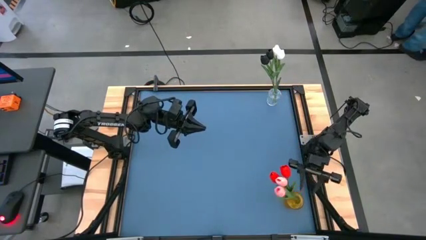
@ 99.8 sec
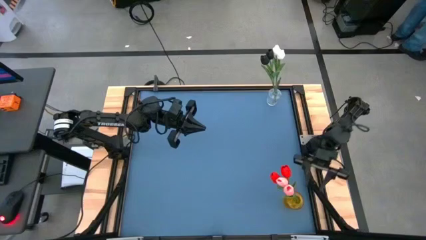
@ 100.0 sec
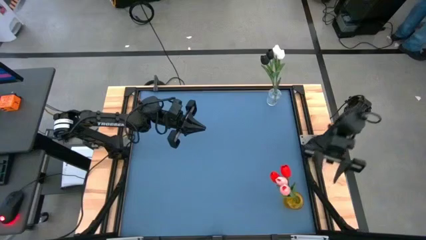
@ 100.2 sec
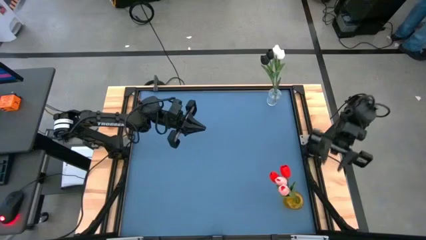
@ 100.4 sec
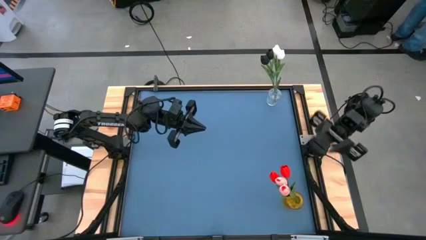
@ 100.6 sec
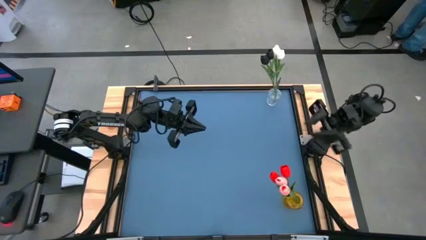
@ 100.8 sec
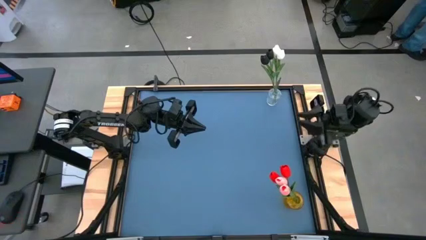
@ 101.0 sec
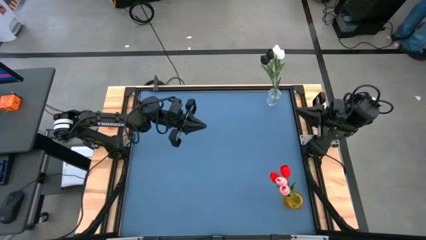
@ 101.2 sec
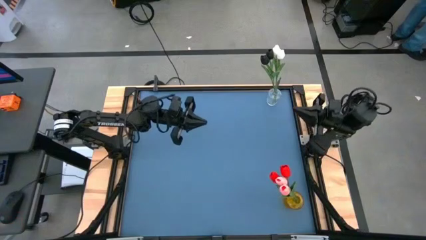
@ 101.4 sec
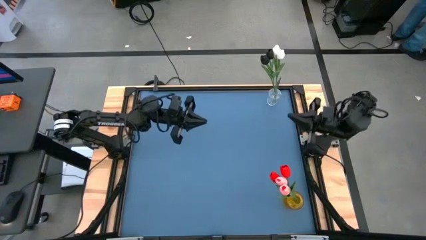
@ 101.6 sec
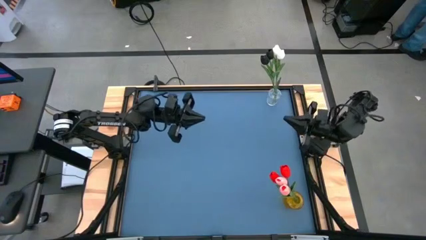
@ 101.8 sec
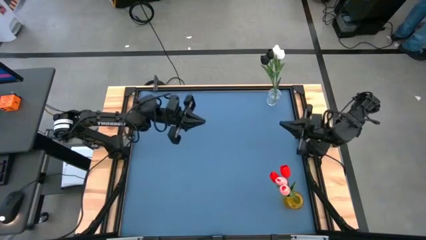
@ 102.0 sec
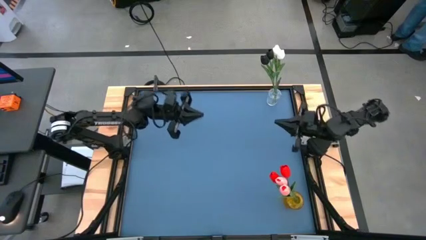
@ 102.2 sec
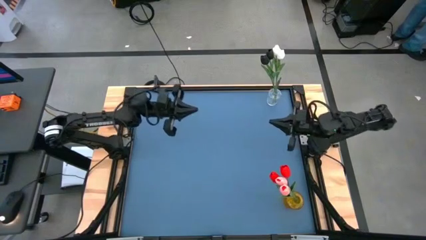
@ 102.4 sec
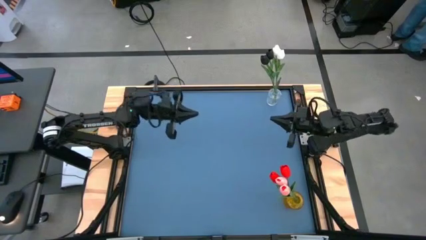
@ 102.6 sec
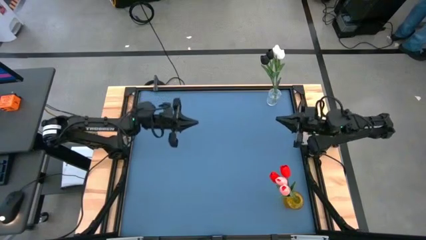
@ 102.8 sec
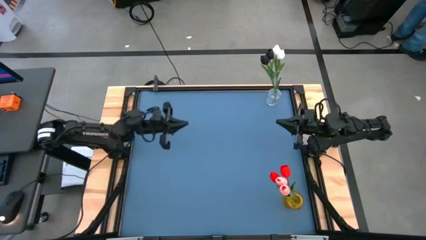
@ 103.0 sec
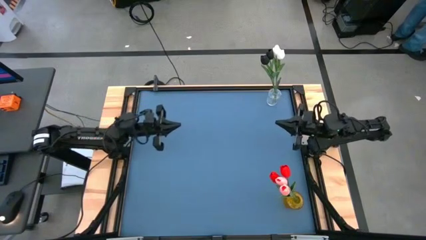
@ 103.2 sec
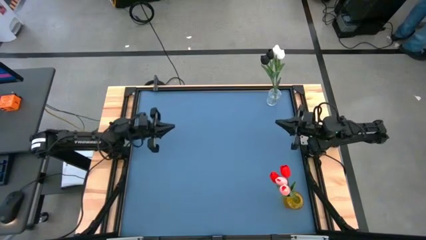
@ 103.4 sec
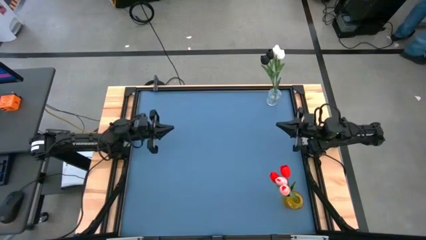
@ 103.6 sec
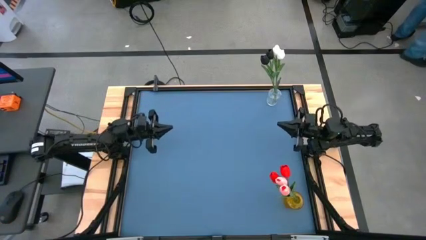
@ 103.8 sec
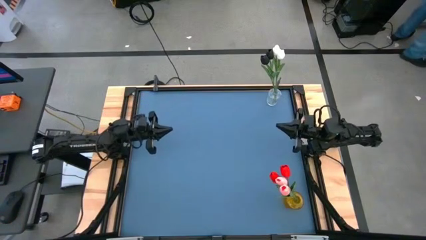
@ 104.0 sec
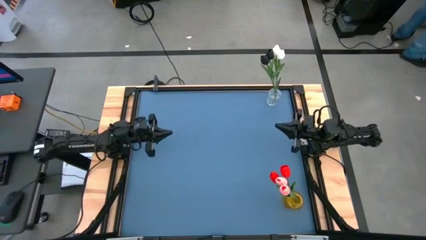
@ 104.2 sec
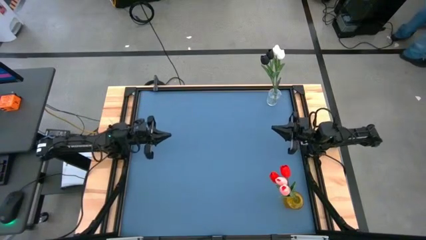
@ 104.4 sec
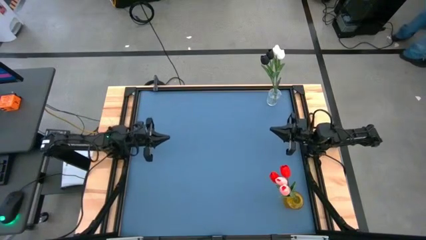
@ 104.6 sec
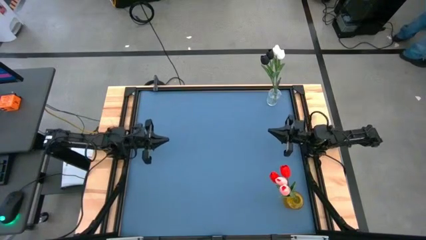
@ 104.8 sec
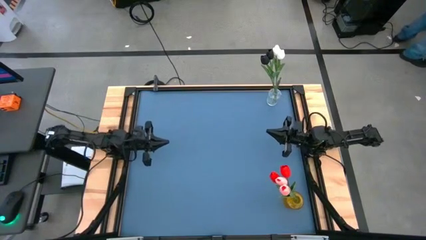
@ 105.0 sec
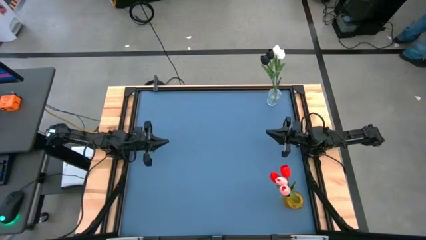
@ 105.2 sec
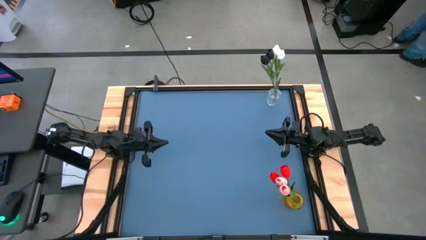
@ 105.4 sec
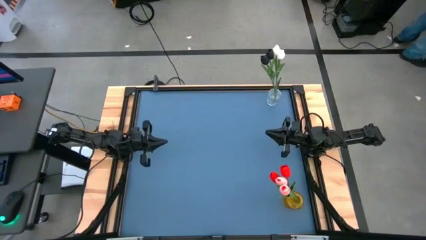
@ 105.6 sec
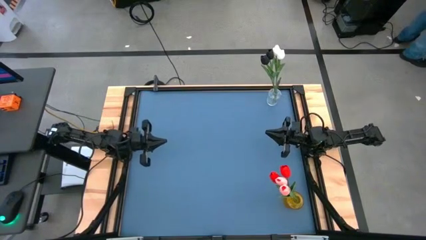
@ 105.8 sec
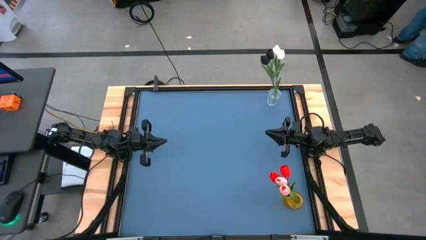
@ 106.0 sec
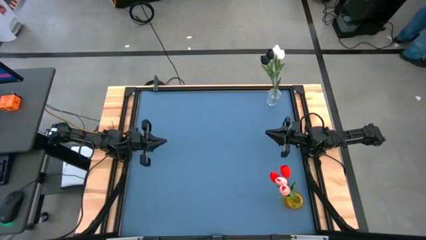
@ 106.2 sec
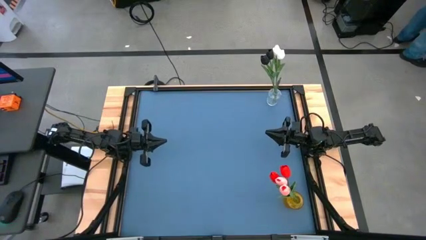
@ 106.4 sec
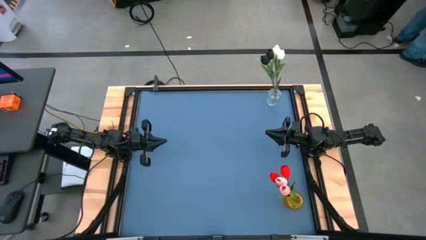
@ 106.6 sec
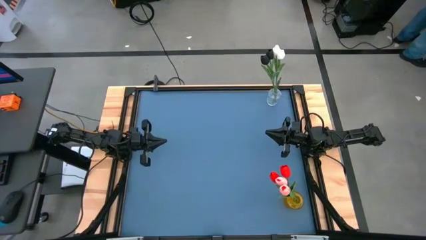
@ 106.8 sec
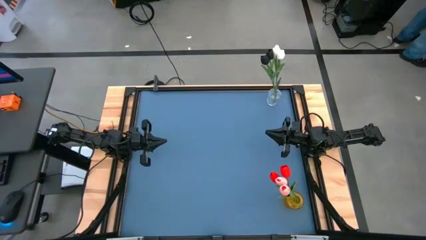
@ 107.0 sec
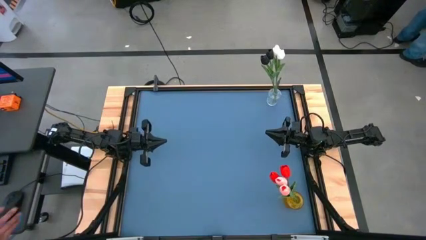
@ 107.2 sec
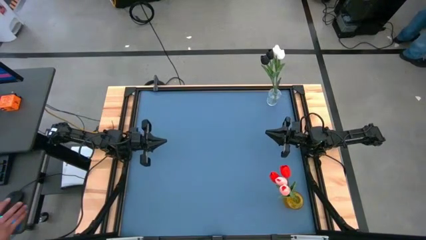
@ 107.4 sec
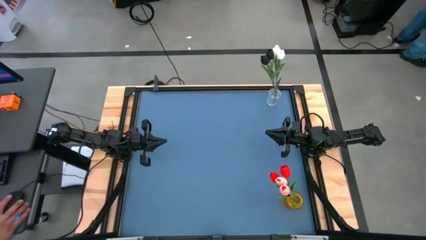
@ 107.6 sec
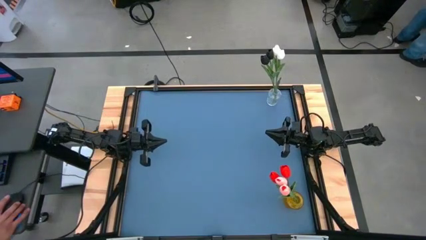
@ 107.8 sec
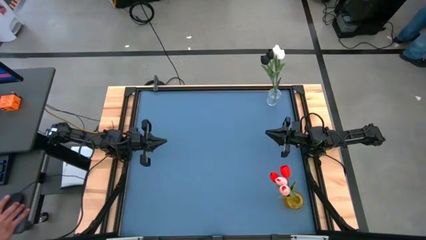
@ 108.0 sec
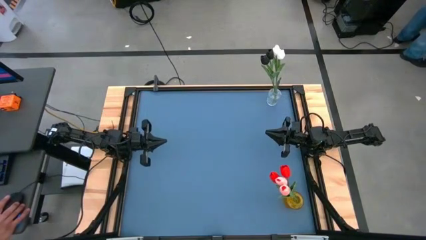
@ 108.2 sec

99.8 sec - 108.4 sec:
Task: Sort flowers into vase by color
Return to Home Position

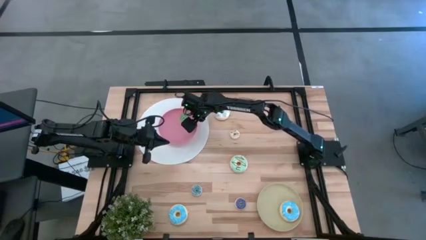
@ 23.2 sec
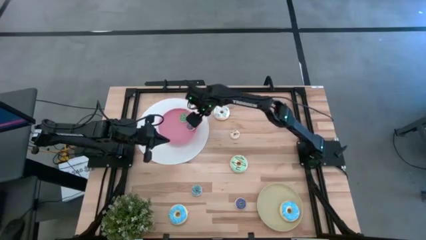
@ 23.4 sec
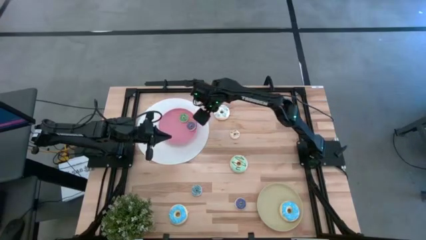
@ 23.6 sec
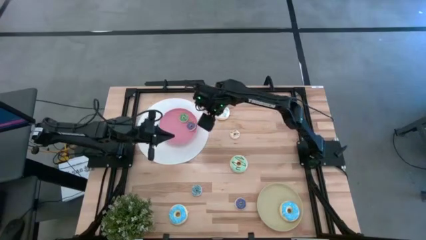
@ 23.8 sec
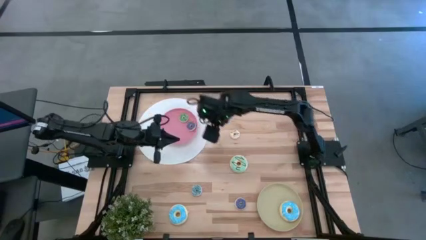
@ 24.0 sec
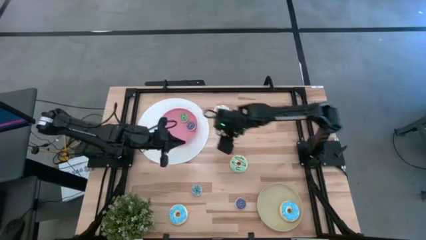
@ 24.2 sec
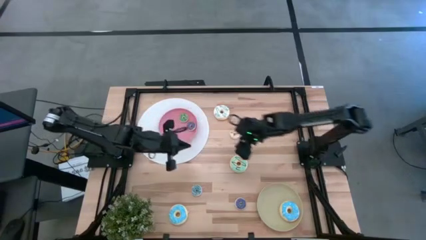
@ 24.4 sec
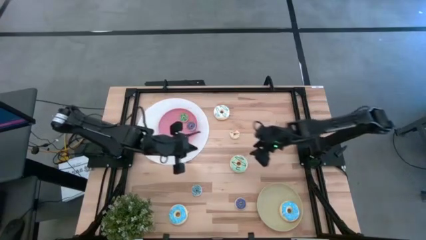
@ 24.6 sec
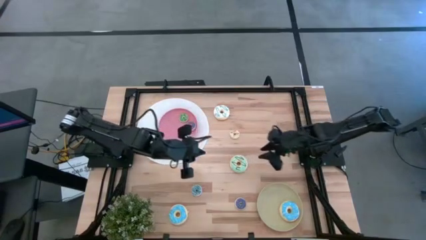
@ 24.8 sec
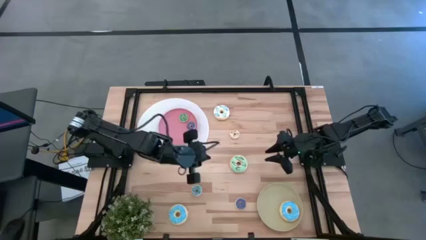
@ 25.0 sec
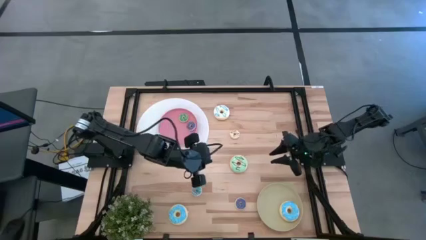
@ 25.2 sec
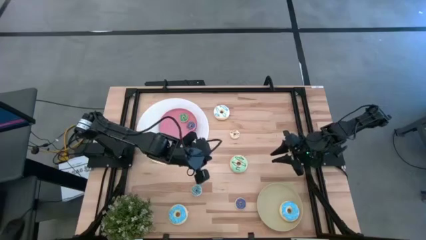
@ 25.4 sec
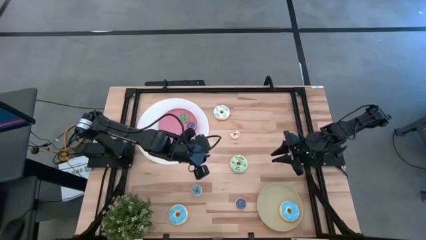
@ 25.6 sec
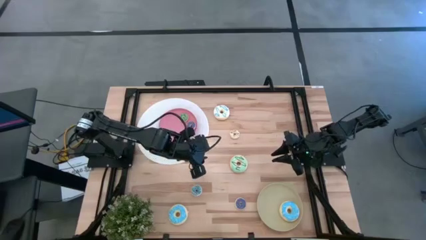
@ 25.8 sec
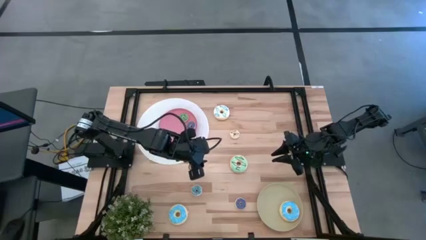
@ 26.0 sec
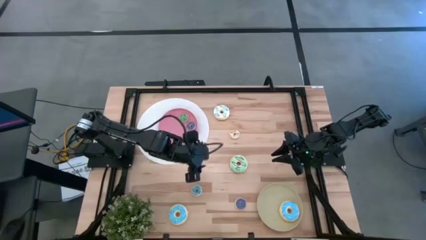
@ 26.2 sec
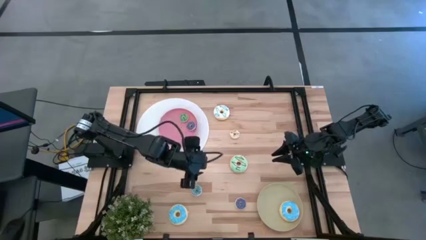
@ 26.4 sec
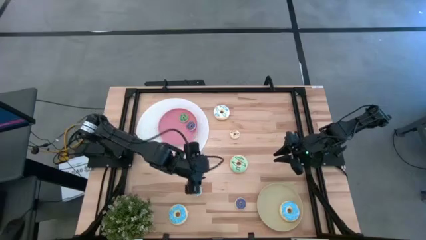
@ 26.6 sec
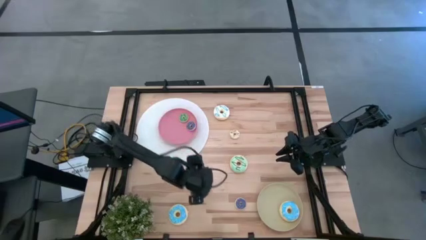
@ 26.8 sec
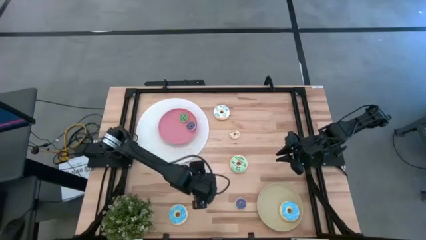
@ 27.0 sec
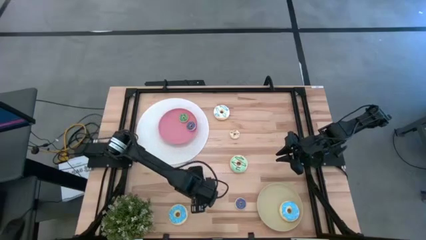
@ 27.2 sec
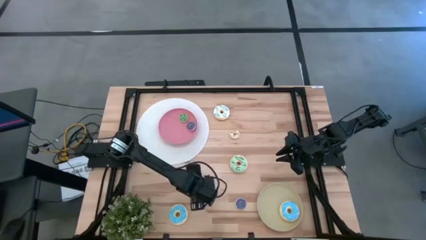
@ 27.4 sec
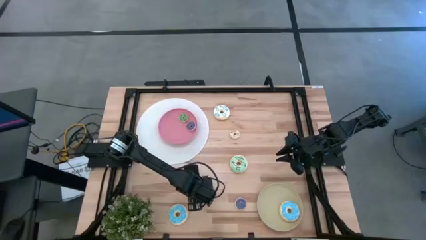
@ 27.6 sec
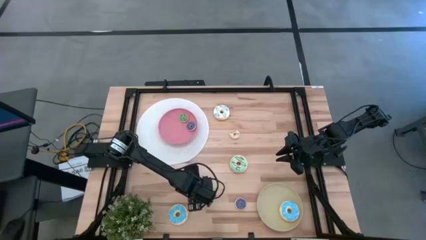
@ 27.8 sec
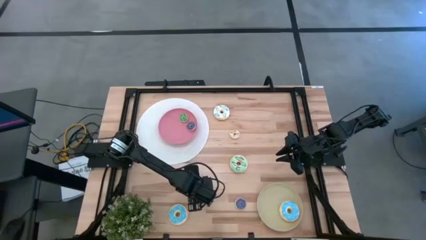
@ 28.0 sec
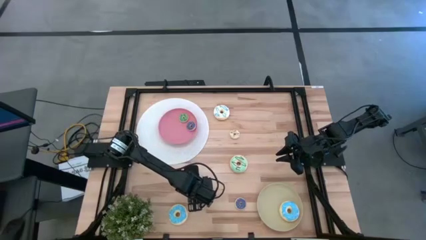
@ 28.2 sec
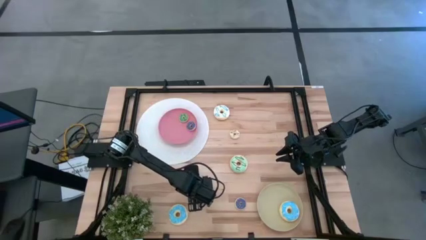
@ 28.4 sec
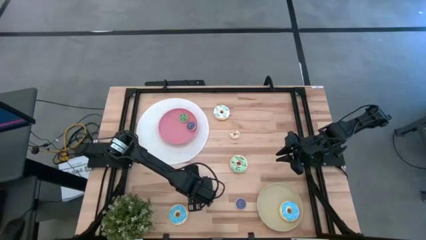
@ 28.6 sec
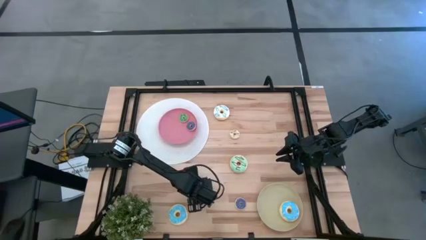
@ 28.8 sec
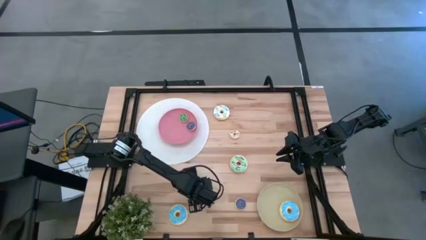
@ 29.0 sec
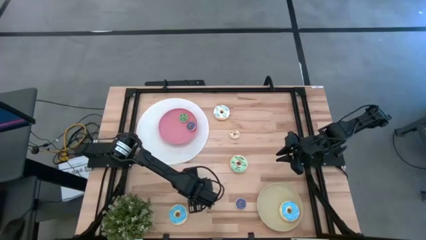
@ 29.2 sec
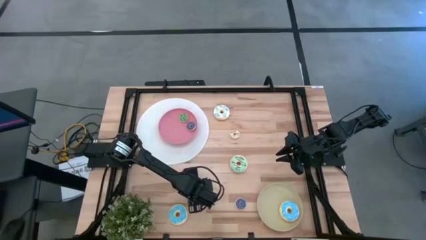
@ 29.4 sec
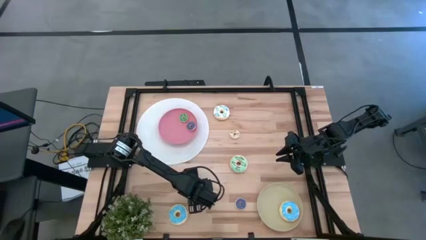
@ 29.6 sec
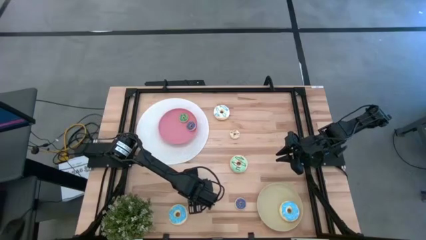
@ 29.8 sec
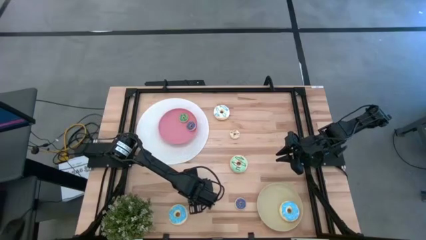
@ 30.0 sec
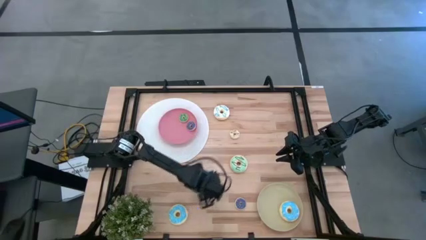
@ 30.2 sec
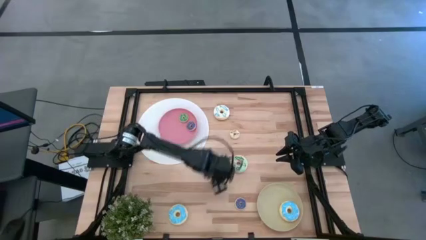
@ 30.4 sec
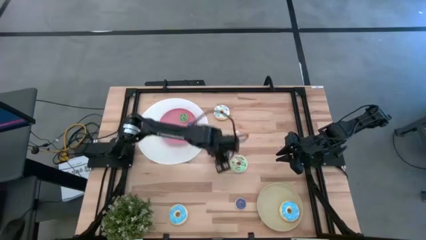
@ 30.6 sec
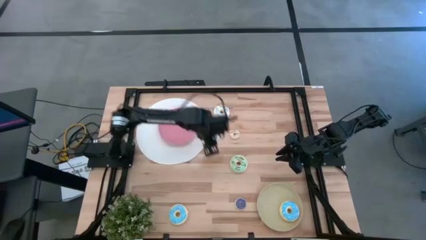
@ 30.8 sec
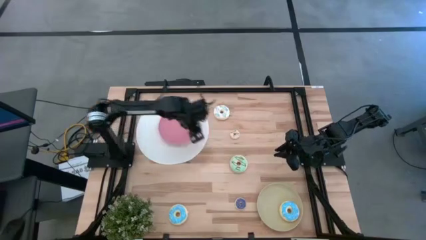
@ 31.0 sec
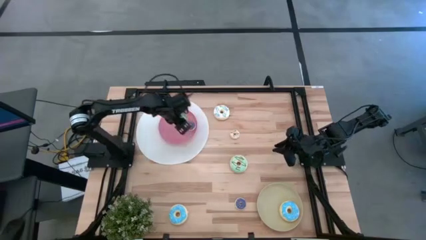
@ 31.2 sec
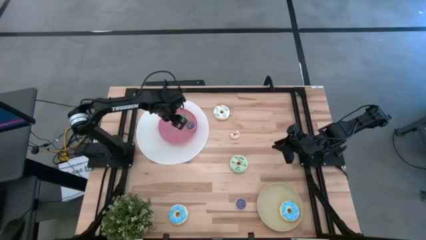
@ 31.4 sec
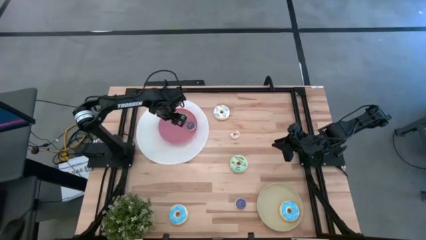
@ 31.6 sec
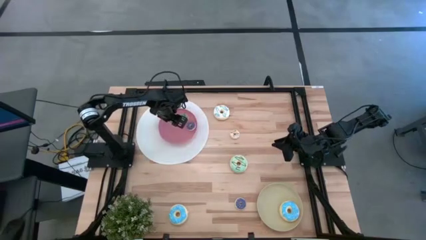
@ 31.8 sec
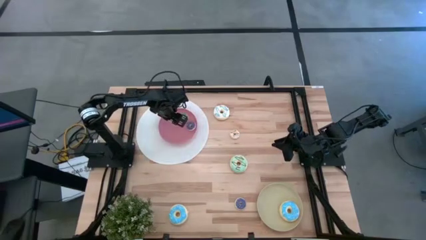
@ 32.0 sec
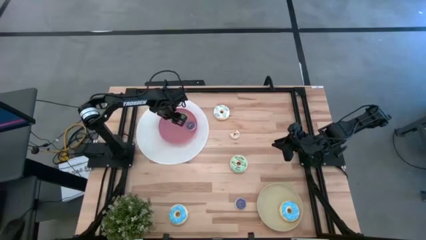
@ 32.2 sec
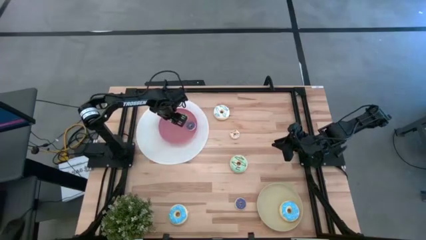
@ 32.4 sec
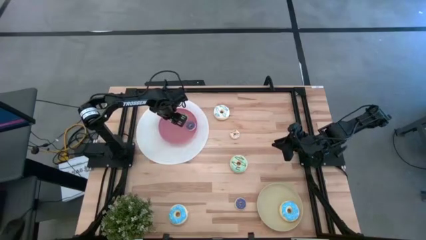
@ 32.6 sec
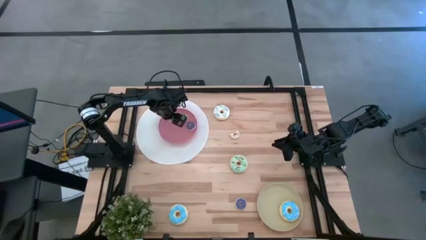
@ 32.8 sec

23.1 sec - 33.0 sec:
Task: Pick & Place donuts
Put the small blue donut on the pink plate
